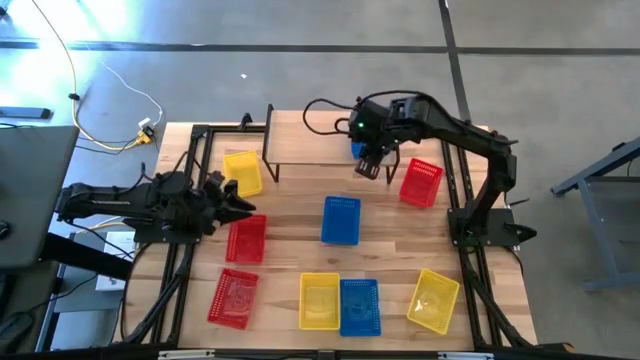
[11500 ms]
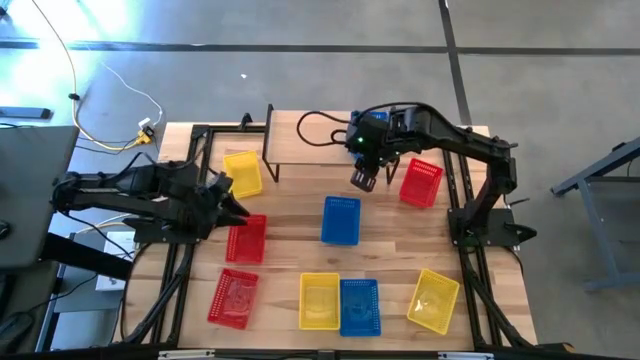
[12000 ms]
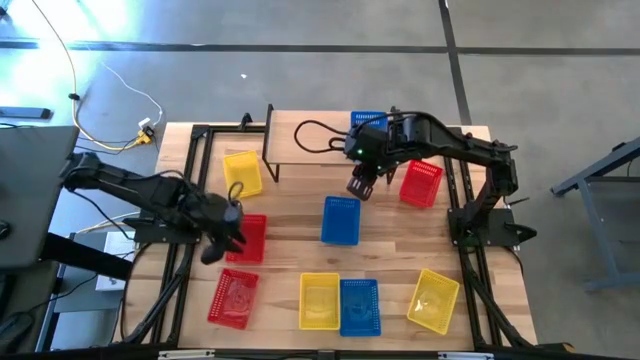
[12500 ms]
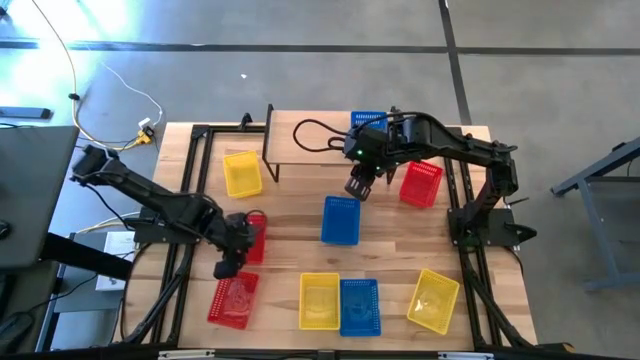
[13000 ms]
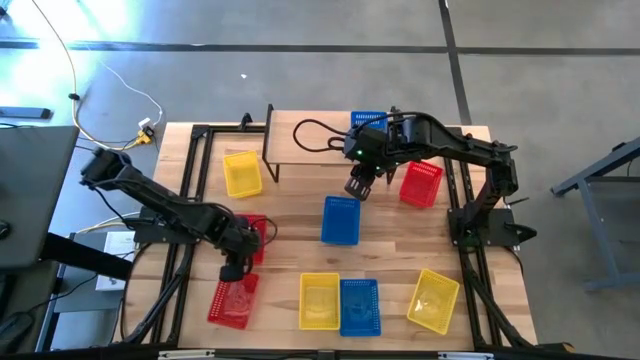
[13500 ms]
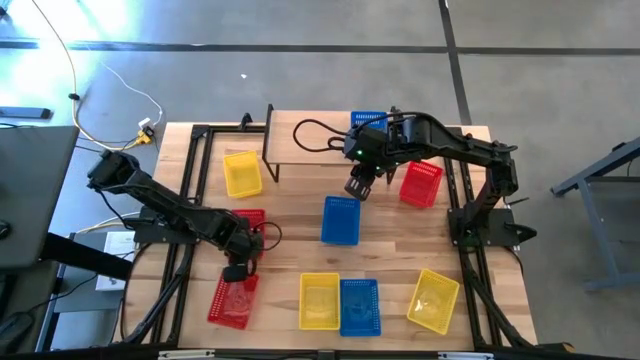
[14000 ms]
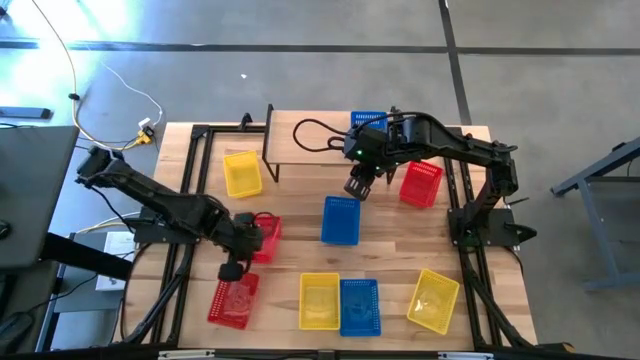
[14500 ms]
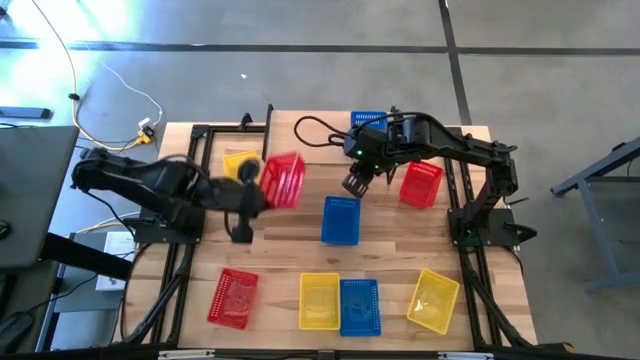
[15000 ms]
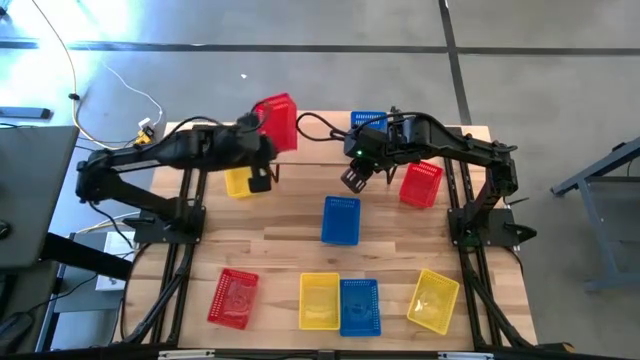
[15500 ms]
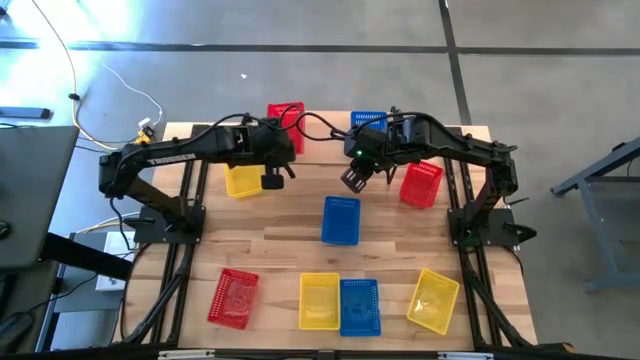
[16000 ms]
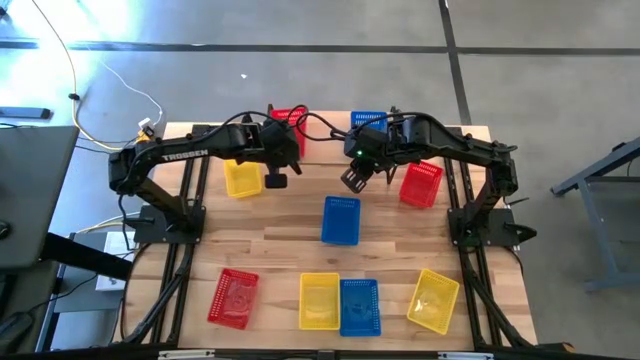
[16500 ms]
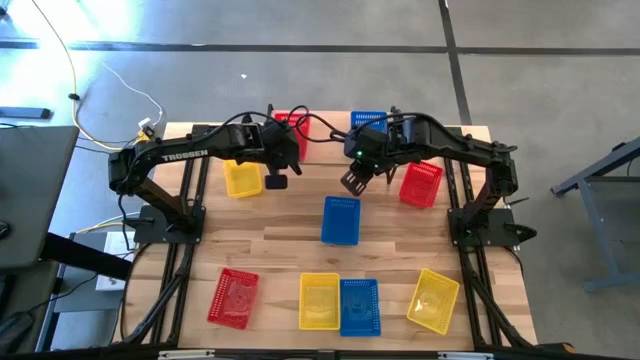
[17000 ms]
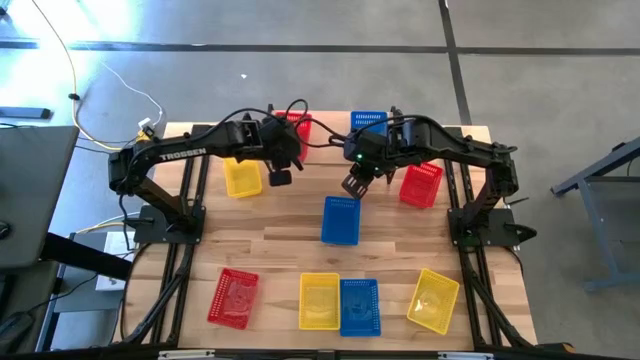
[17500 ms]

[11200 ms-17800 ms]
Task: Stack baskets on shelf by color
Put the middle left red bin on the shelf

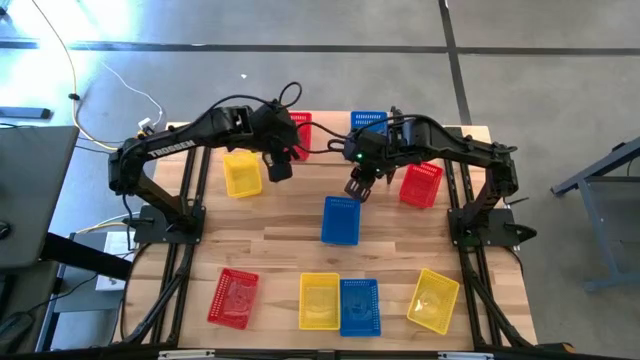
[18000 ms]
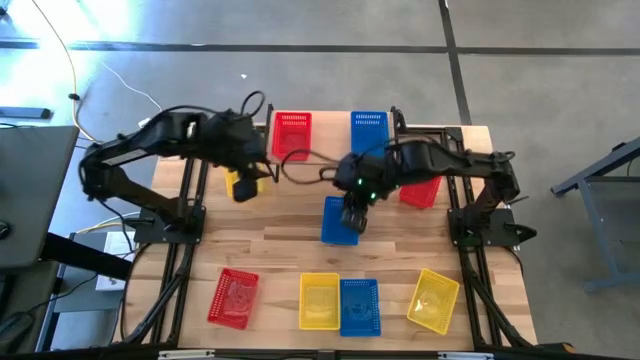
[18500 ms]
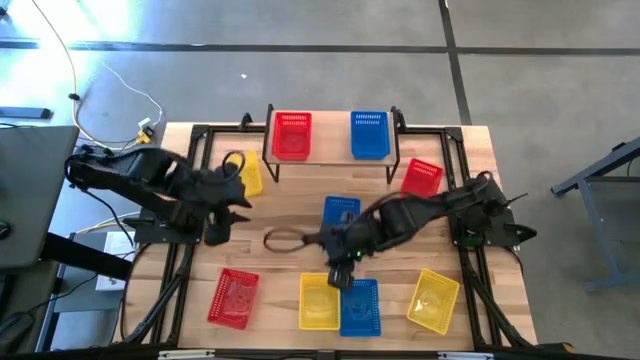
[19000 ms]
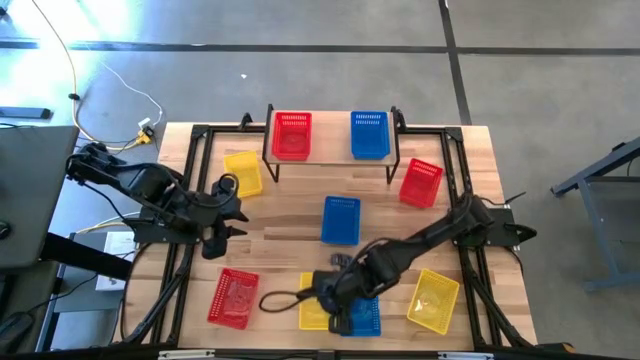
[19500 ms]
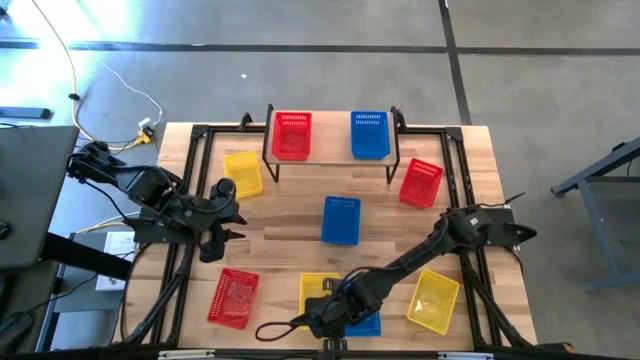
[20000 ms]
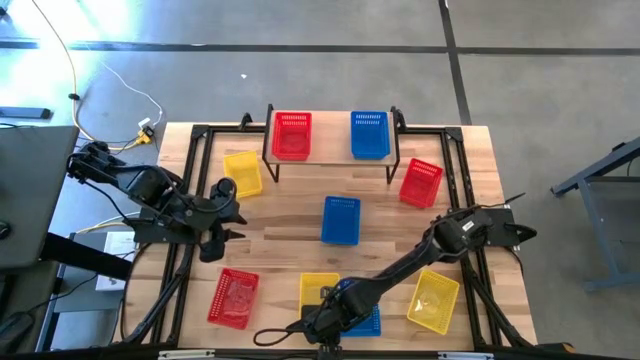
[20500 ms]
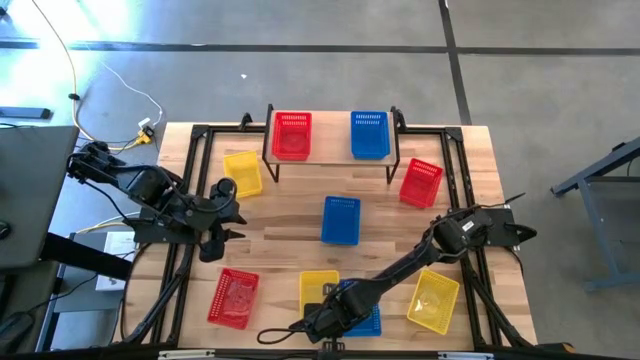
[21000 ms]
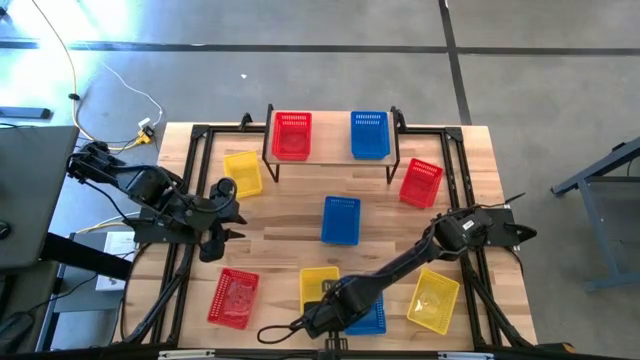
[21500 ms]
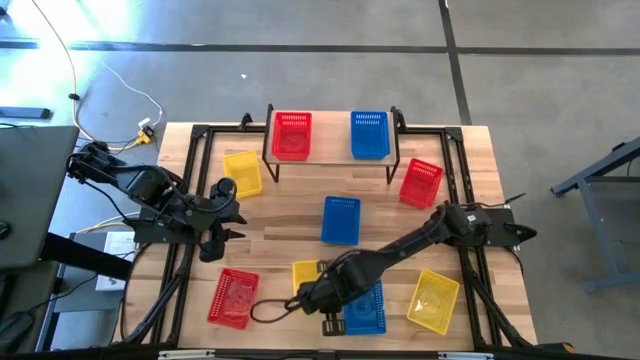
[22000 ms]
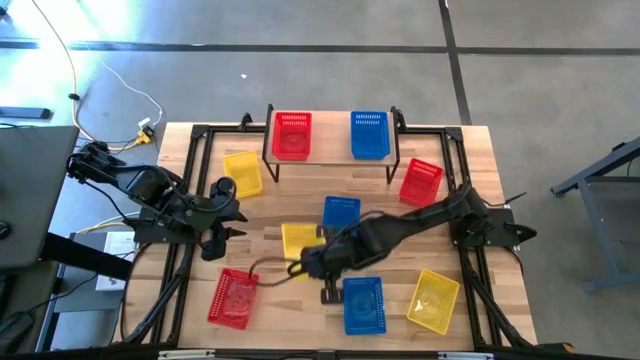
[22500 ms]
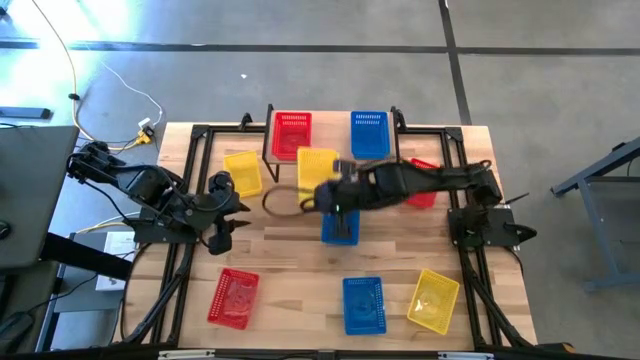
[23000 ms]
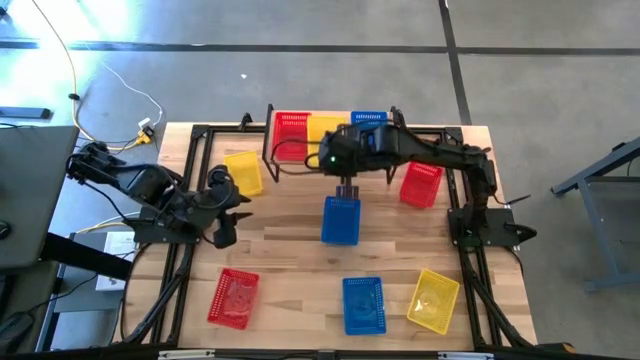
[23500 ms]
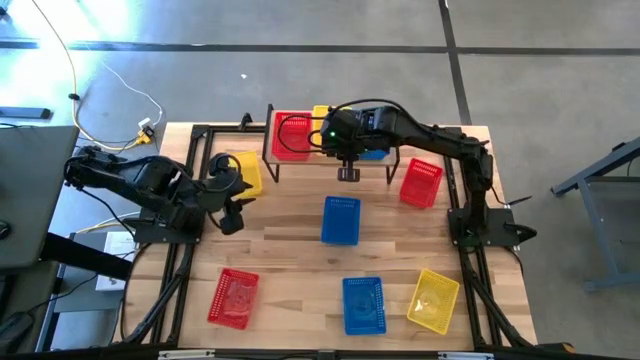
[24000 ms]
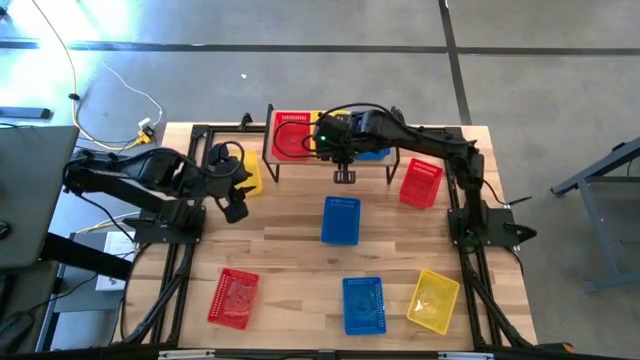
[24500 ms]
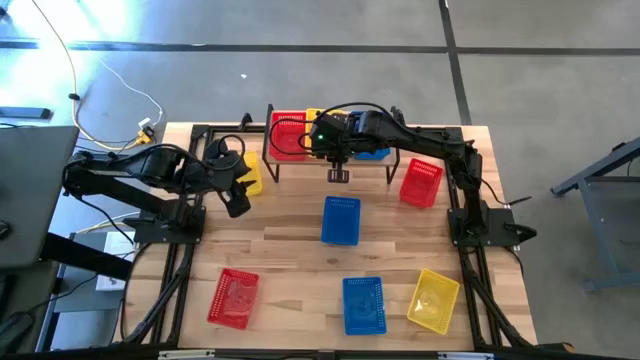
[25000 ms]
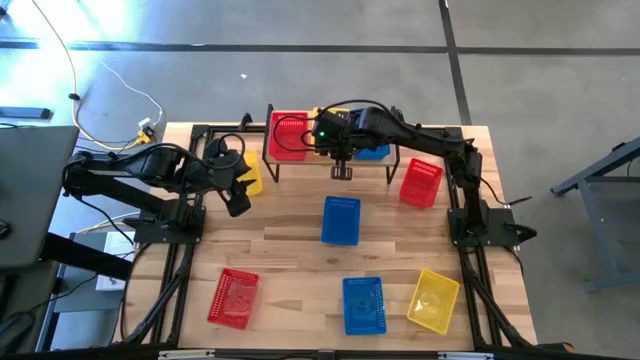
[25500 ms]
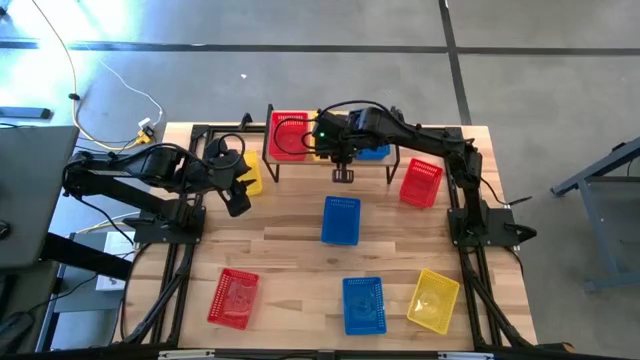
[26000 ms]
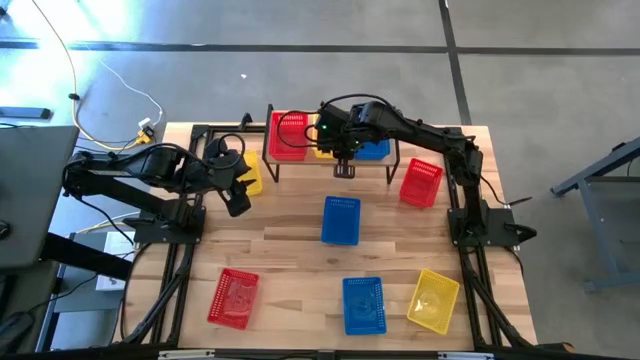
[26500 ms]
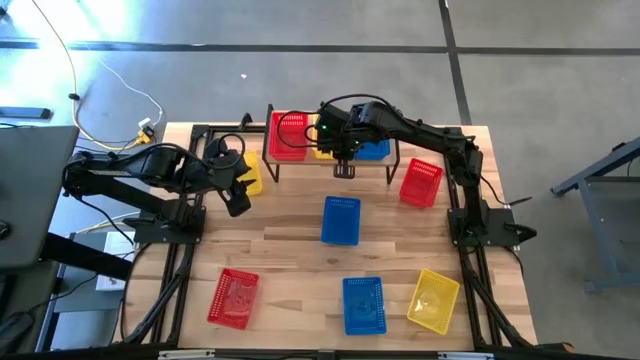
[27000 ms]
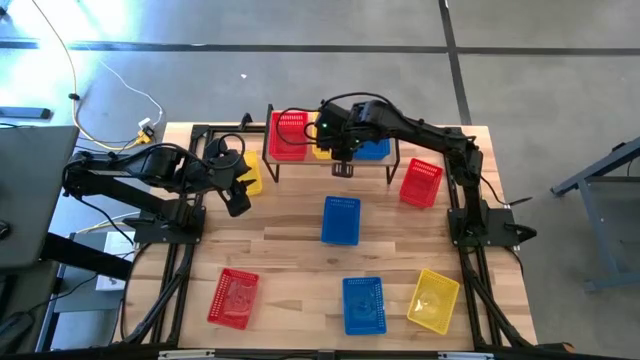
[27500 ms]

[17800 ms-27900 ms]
Put the lower middle yellow bin on the shelf

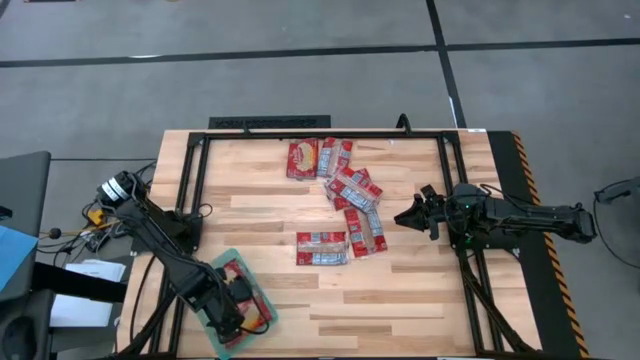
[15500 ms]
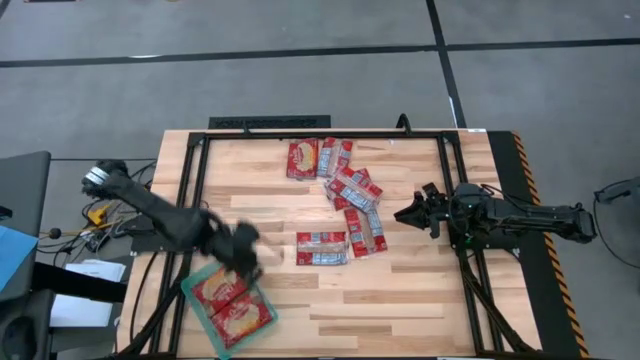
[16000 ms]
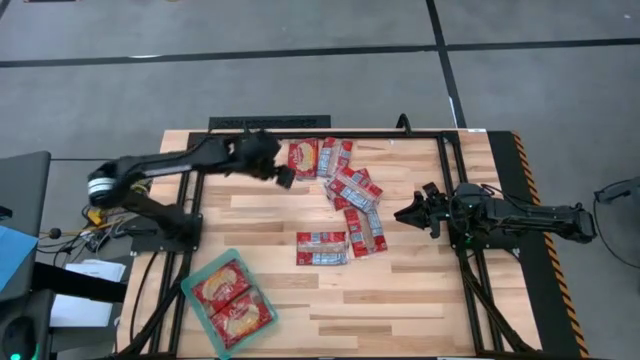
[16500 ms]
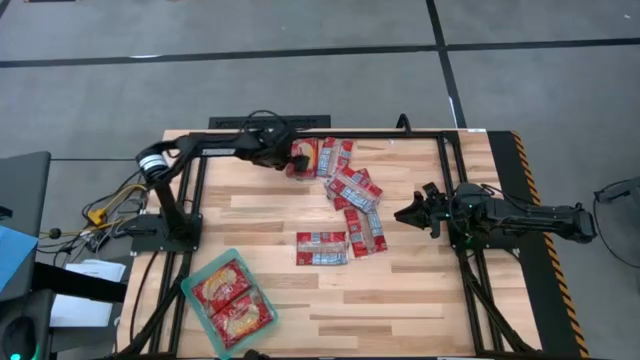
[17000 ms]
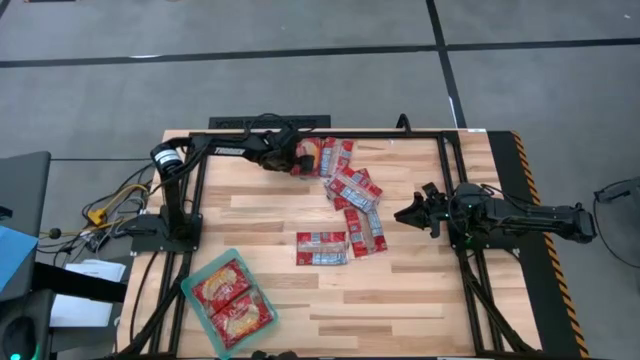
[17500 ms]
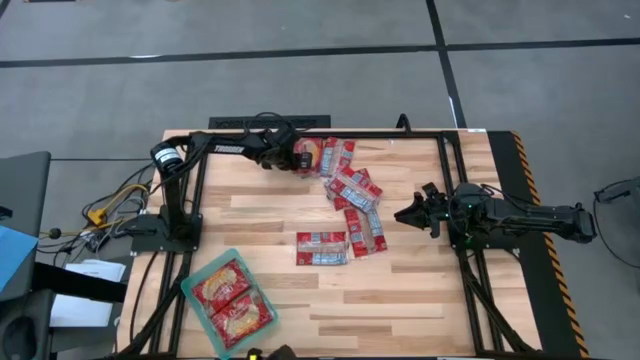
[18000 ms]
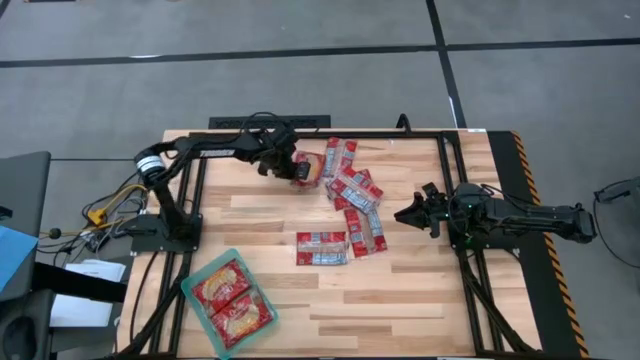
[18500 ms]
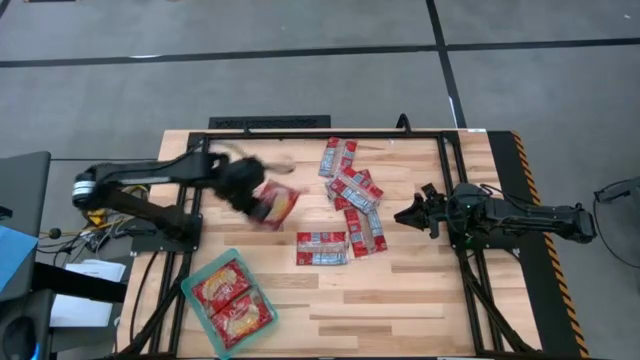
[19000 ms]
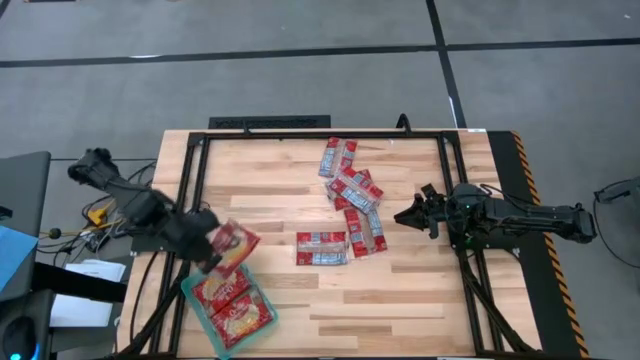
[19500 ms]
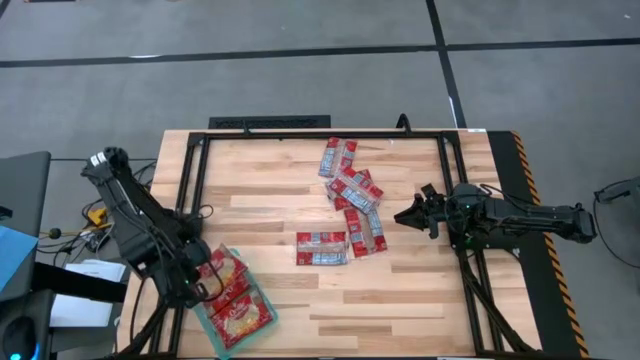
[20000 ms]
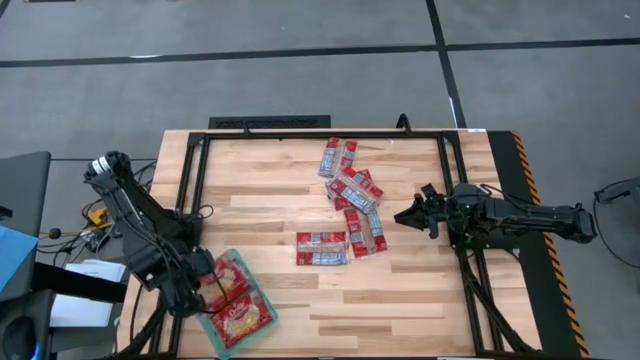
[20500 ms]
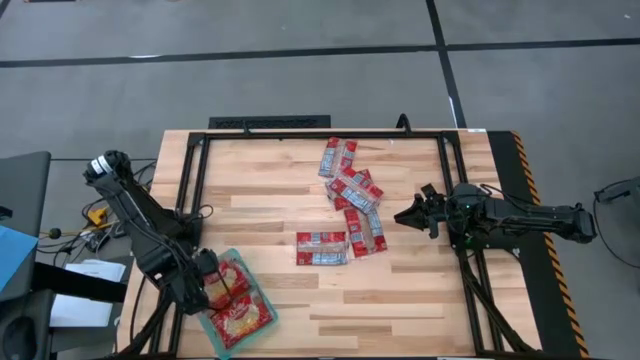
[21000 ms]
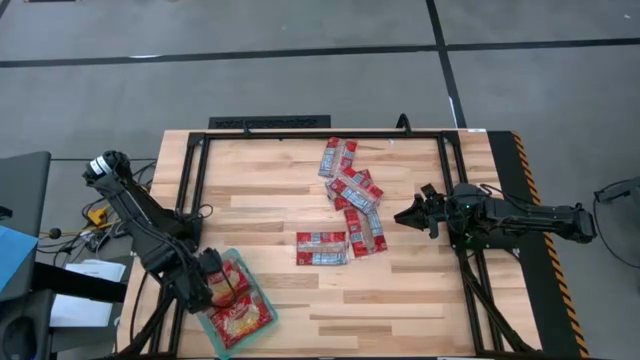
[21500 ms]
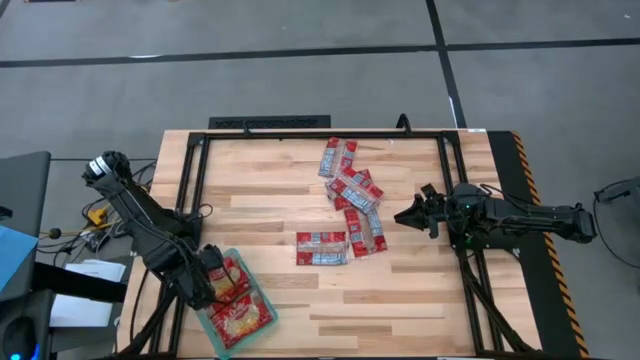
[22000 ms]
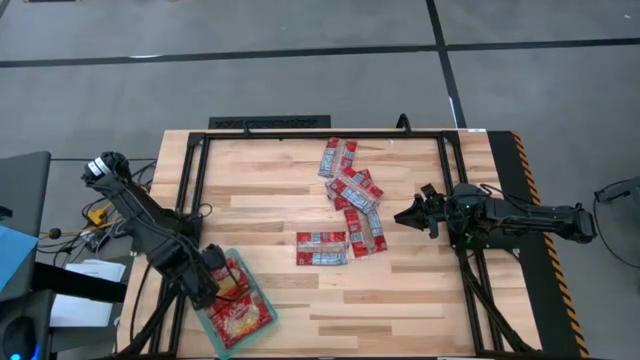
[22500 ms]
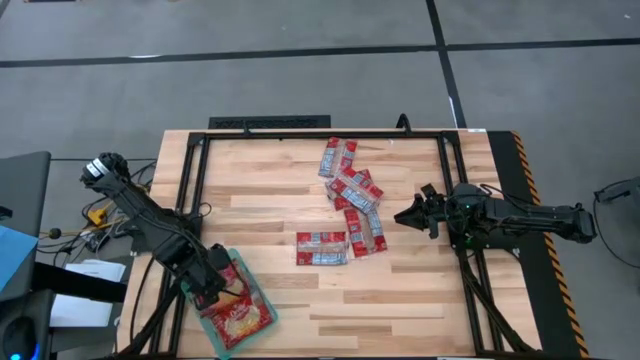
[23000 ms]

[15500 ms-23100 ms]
Task: Sort popcorn bags into baskets
Put the red popcorn bag into the green bin
